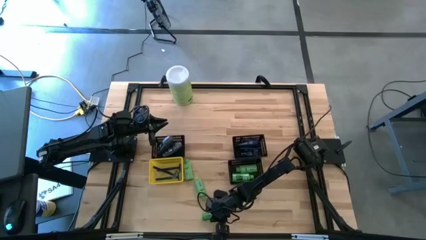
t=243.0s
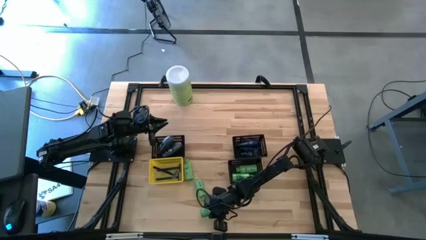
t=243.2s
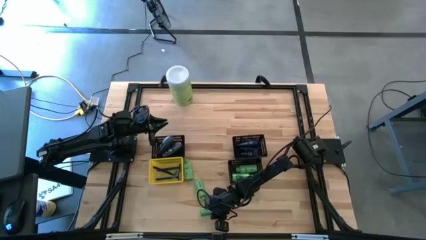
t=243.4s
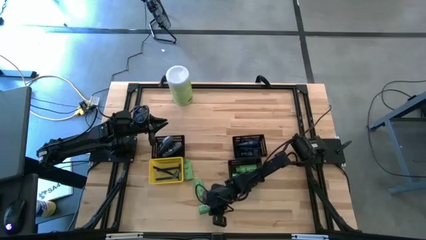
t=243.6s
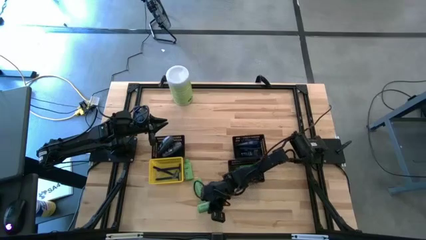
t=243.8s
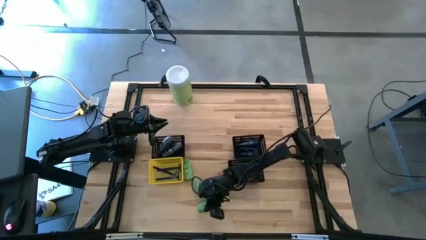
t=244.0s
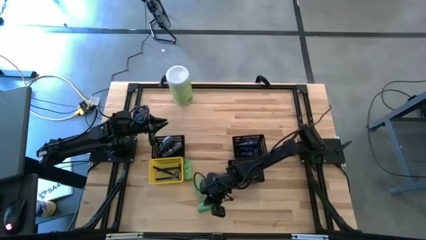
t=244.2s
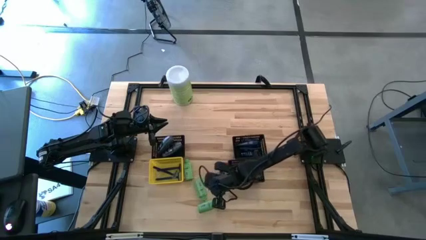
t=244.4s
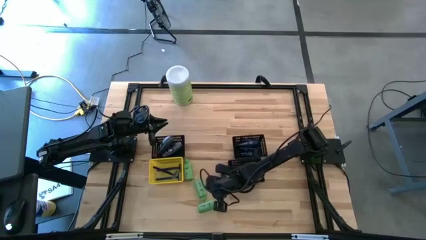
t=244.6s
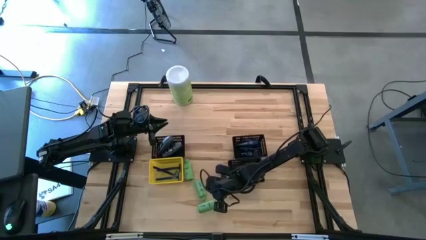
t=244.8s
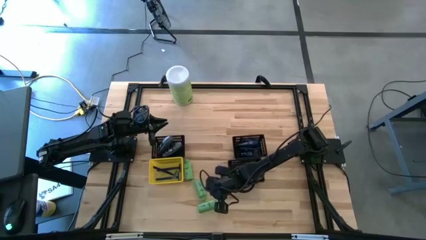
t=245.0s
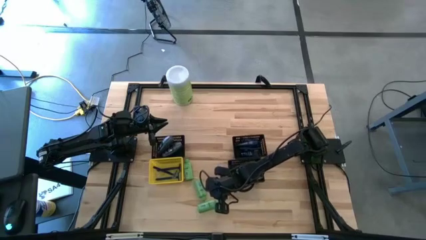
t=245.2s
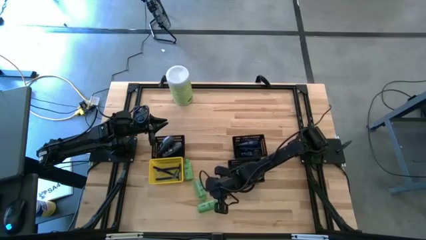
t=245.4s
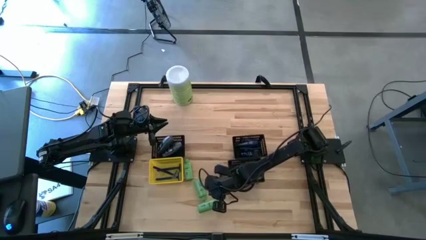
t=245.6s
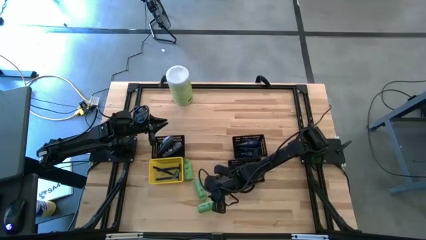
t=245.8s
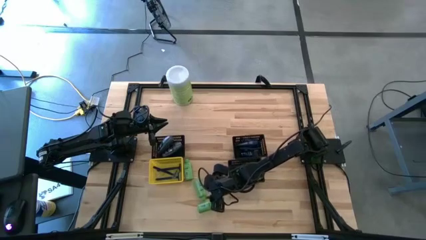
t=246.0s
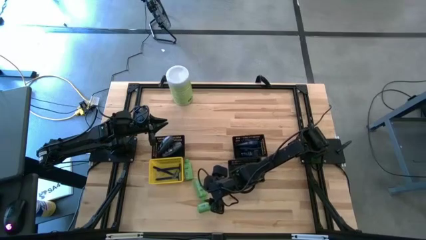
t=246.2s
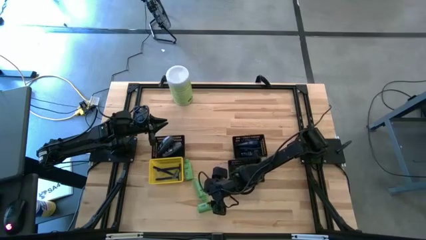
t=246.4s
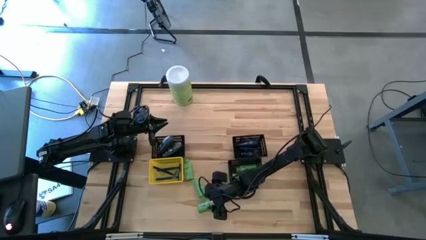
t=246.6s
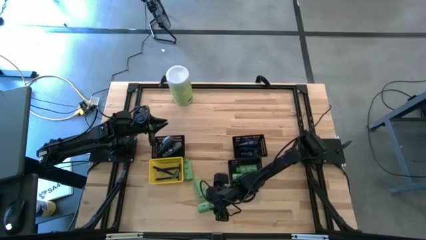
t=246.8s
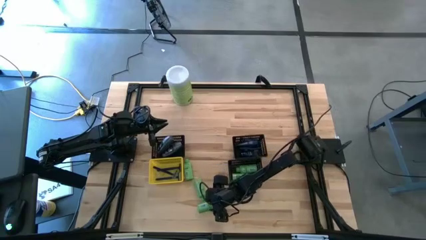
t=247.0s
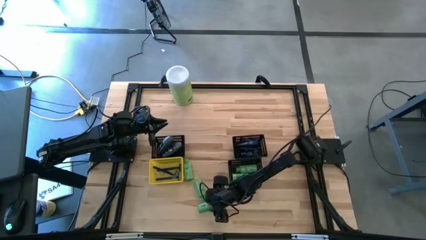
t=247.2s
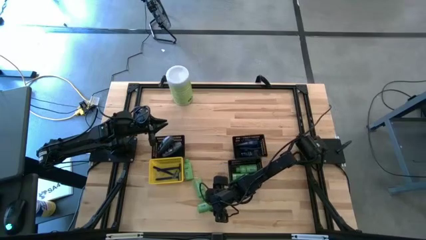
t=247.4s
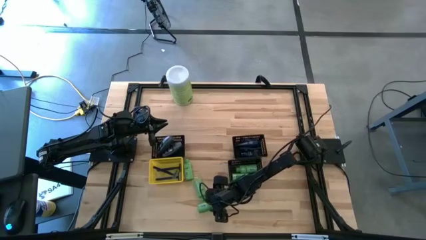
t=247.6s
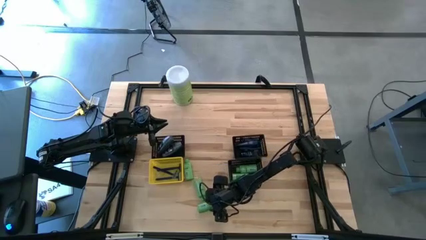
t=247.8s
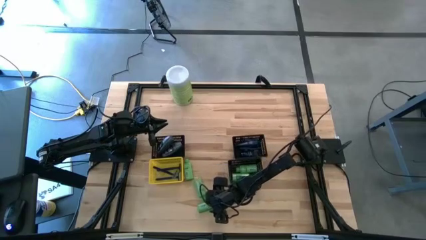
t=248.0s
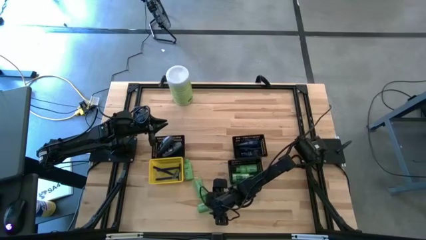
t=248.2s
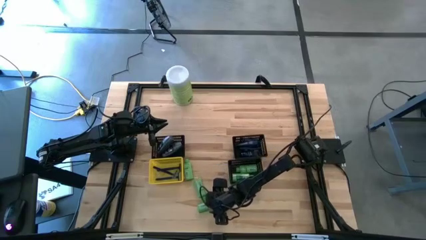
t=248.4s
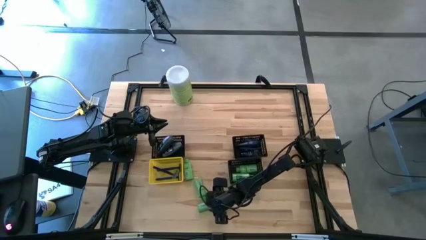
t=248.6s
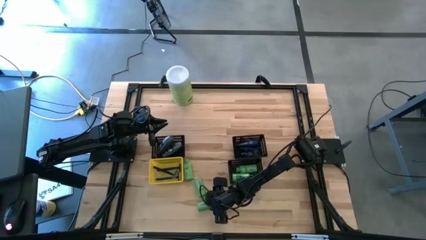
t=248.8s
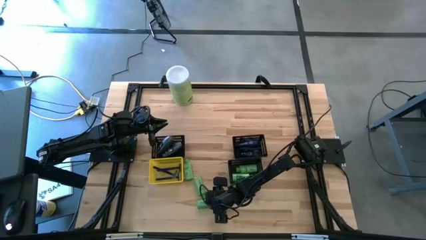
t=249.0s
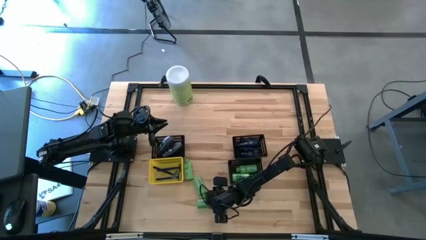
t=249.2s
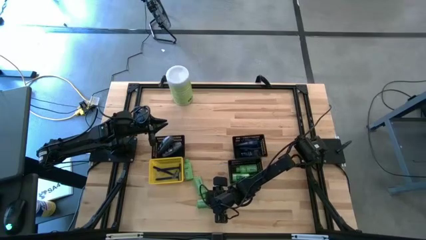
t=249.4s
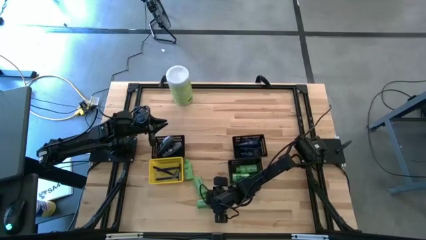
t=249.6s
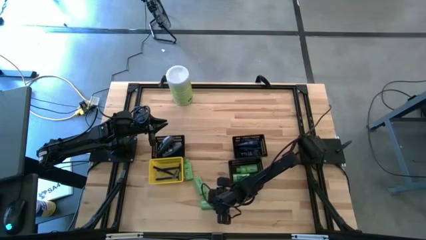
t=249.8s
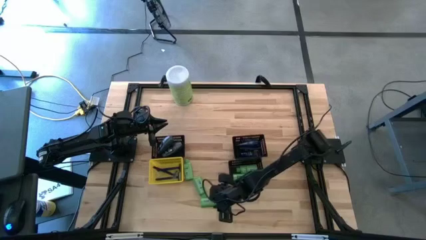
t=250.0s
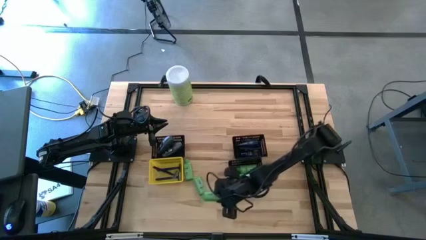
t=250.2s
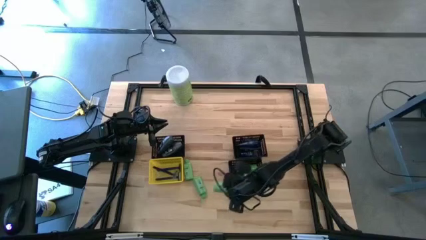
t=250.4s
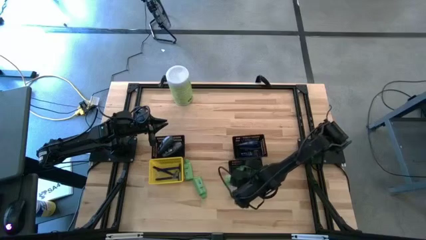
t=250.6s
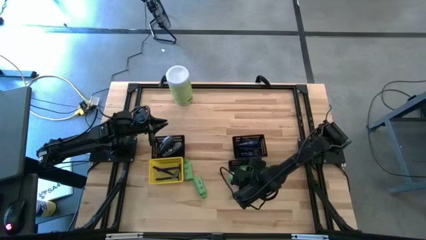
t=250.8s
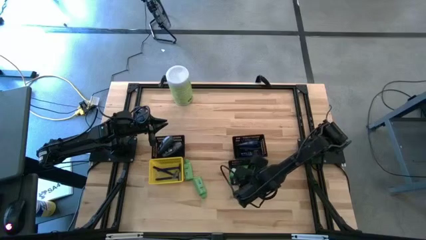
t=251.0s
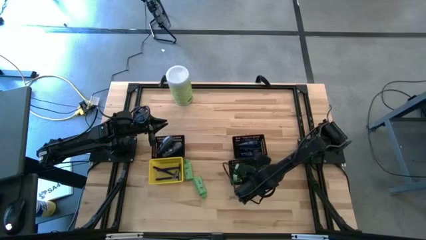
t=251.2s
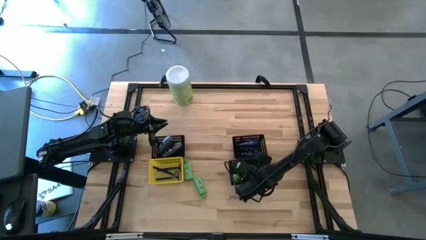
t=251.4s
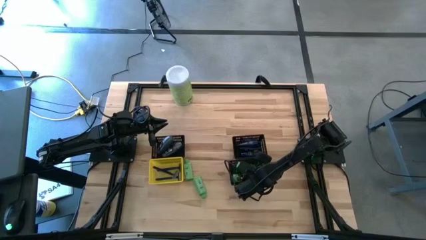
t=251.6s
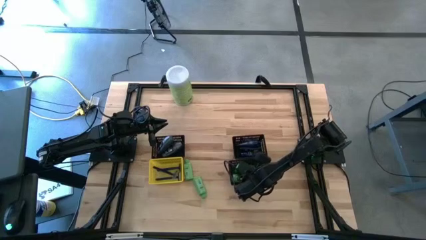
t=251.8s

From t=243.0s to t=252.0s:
Task: Pick & Place Travel size toiletries
Put the green shampoo into the bottom right black bin

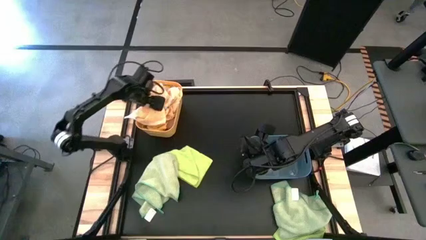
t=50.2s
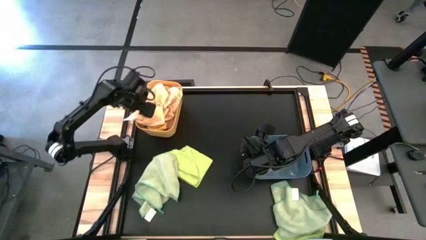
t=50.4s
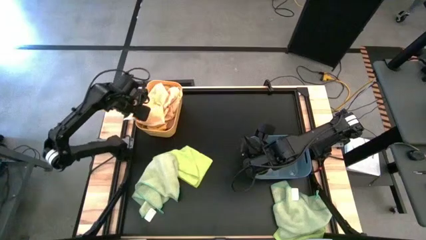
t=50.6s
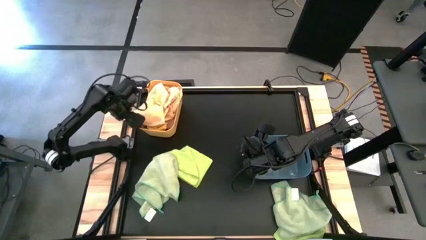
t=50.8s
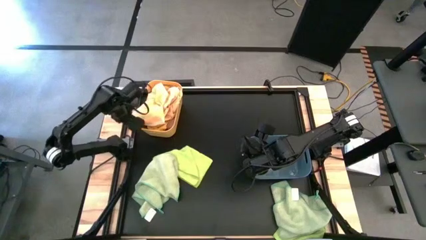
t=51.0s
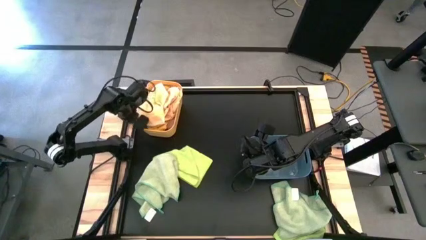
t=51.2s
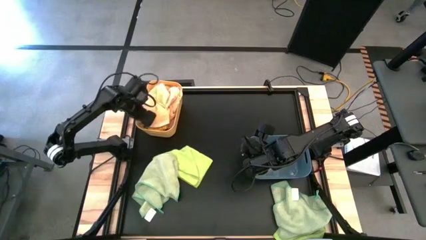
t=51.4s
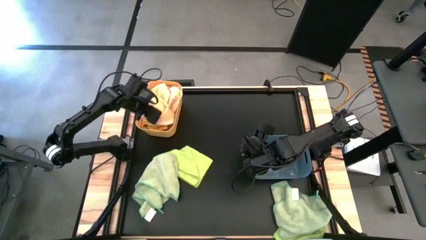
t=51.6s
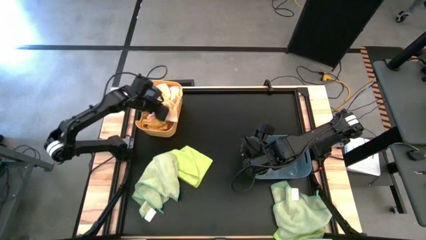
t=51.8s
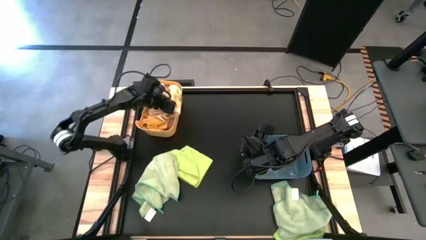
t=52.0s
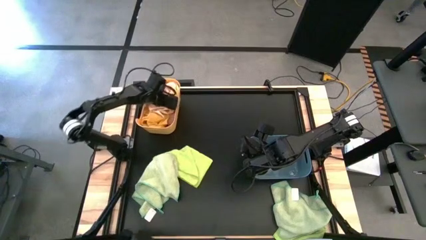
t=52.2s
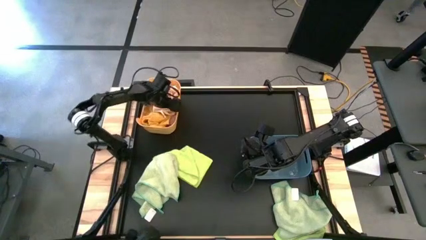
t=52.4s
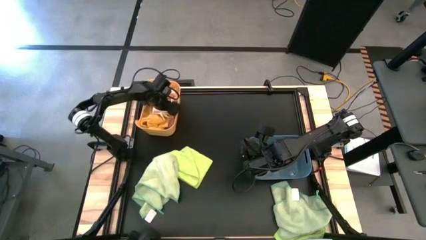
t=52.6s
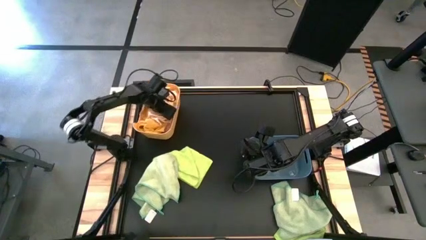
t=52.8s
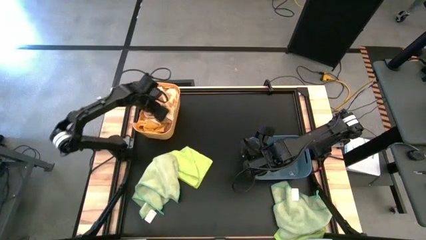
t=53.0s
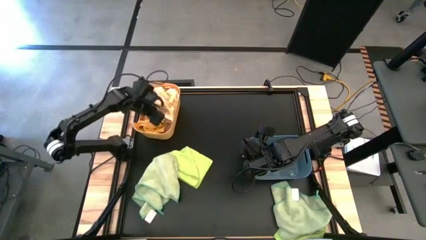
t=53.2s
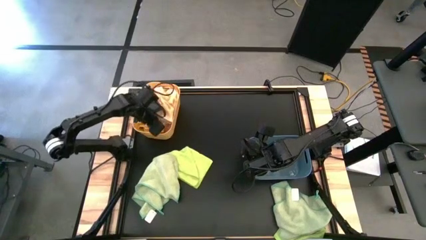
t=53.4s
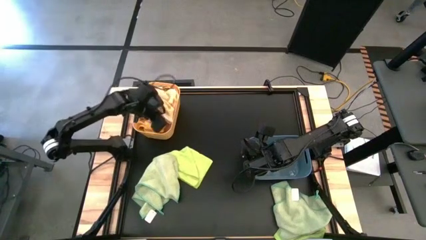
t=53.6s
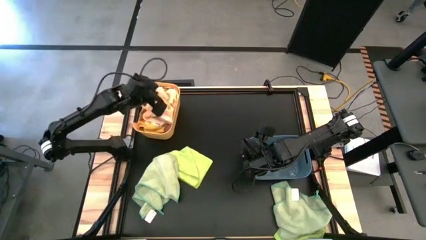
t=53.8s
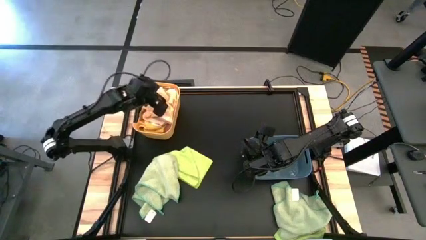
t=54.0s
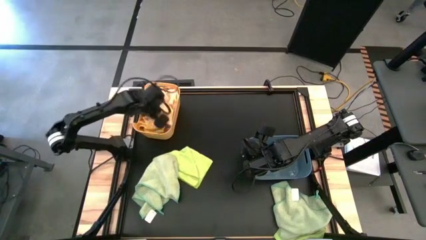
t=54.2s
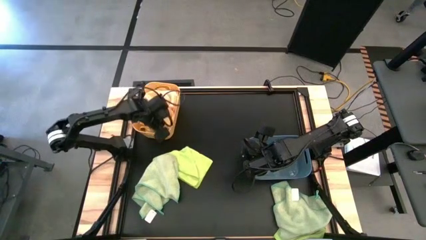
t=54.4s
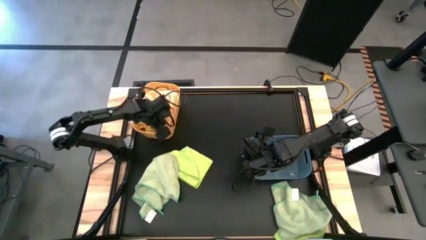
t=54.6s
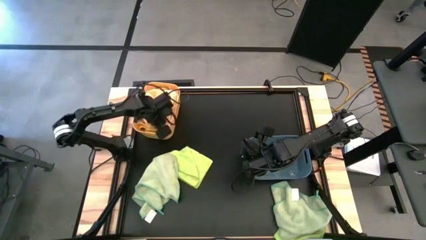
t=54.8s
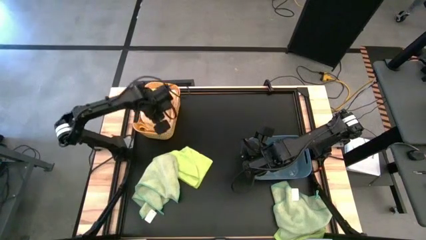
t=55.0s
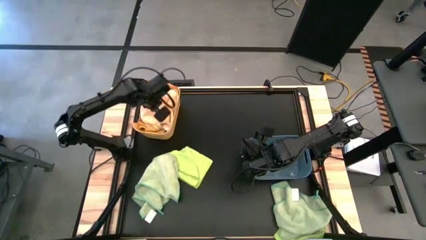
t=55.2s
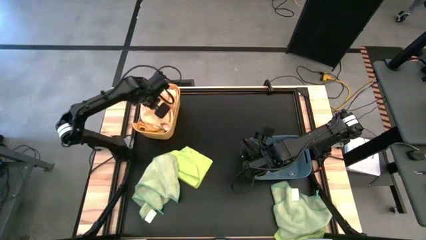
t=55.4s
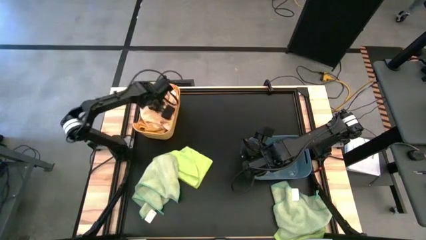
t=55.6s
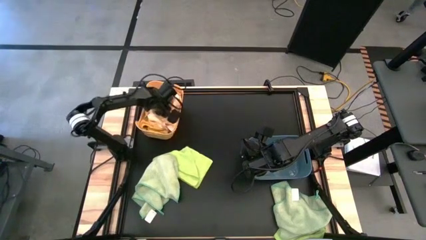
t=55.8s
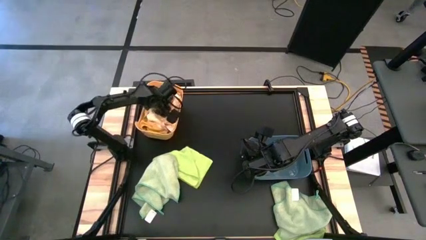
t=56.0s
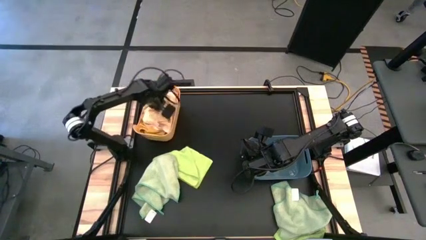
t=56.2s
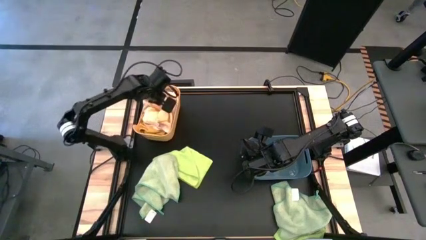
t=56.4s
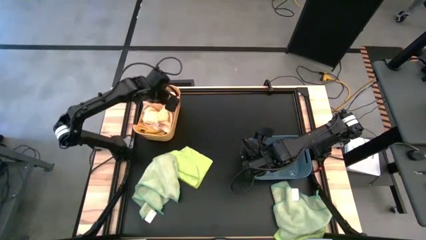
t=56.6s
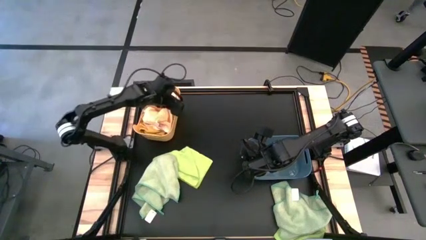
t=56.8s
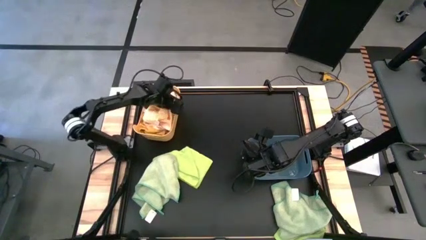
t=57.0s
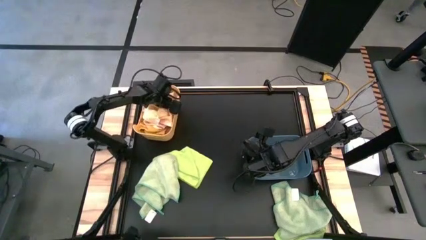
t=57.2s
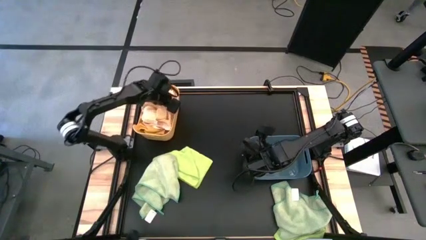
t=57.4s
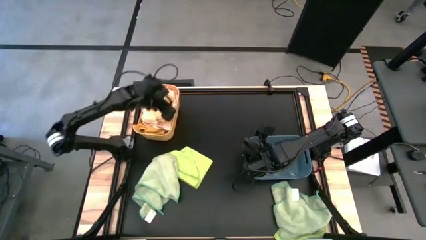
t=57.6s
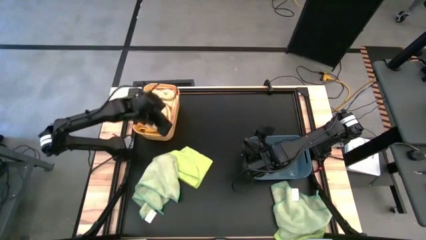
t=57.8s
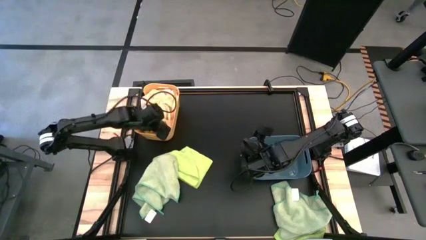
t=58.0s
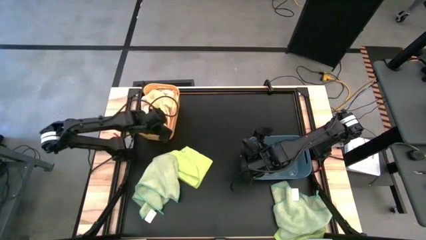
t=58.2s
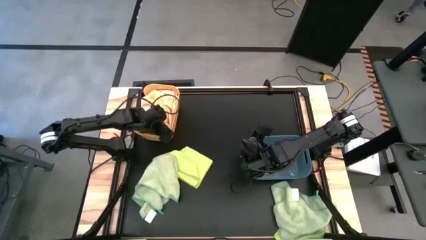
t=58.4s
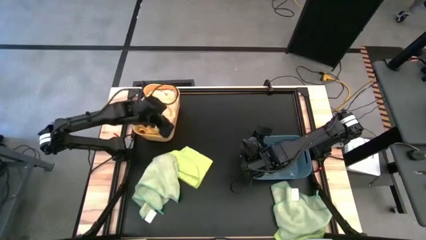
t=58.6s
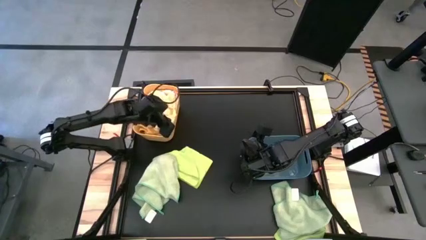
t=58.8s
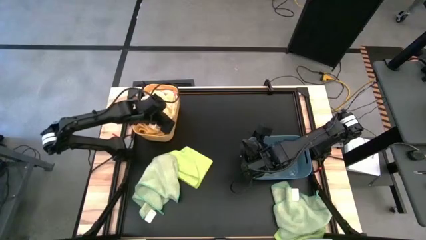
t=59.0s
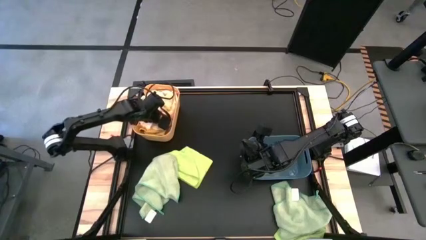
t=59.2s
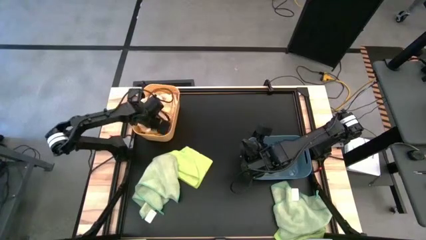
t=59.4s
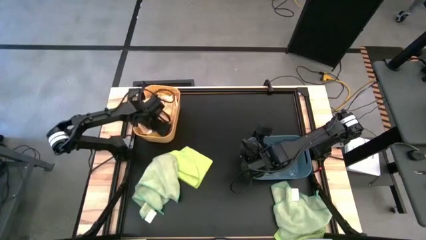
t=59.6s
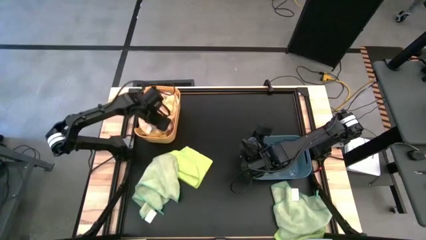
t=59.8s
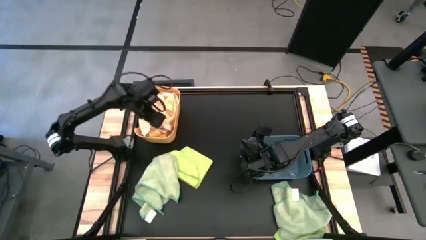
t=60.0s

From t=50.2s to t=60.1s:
Task: Sort towels by color in basket
Put the light yellow microfiber cloth into the yellow bin
